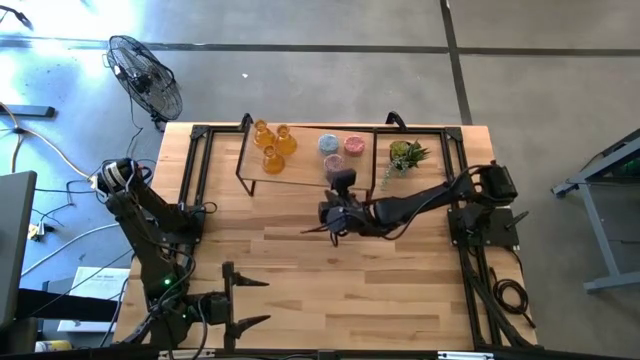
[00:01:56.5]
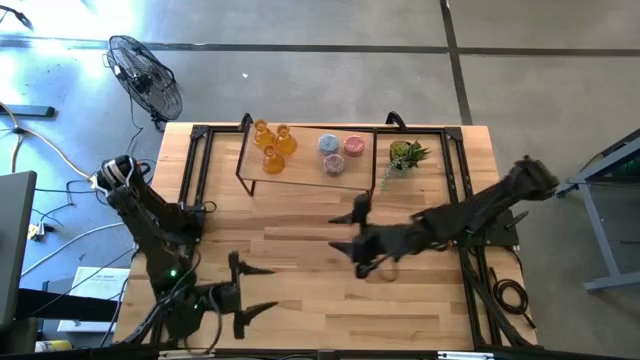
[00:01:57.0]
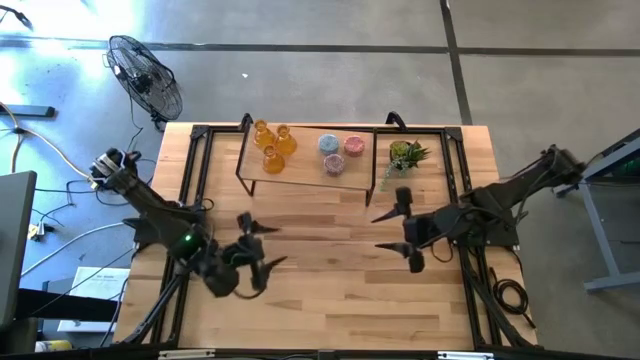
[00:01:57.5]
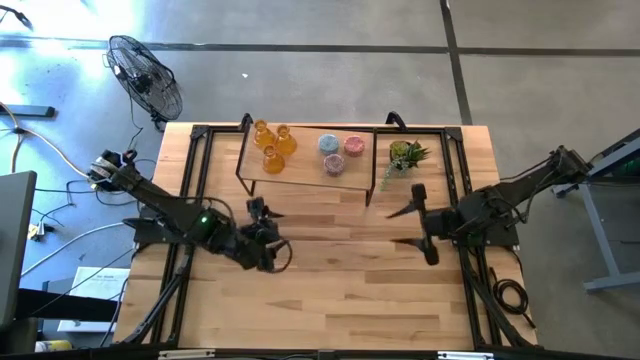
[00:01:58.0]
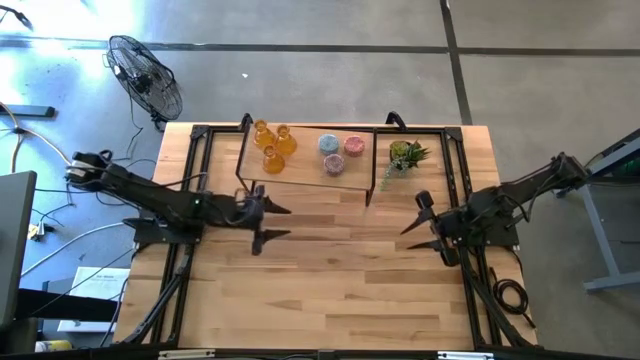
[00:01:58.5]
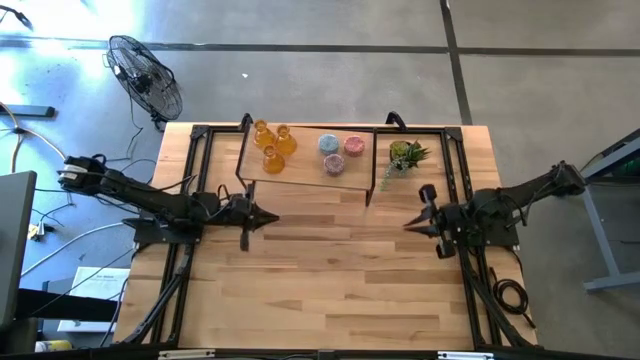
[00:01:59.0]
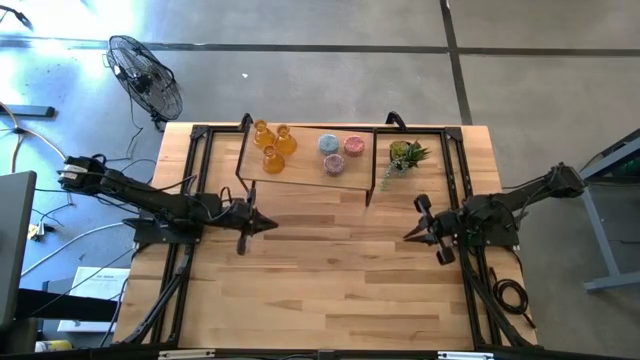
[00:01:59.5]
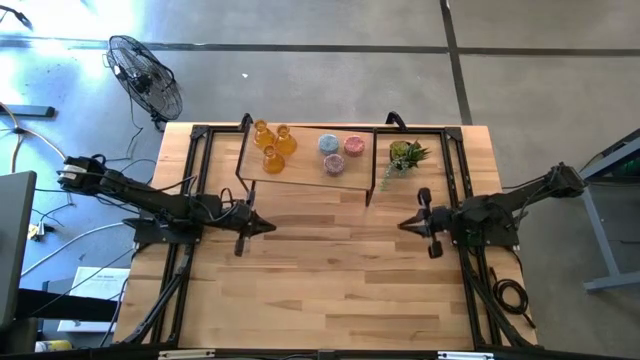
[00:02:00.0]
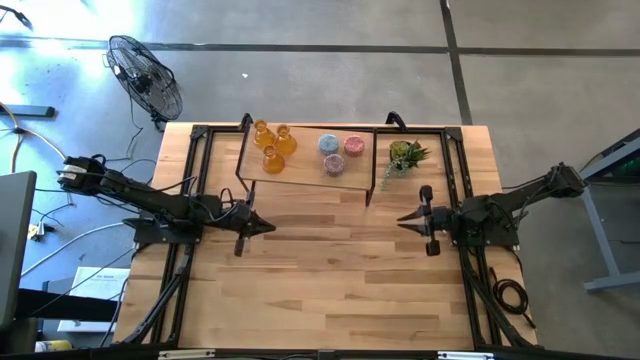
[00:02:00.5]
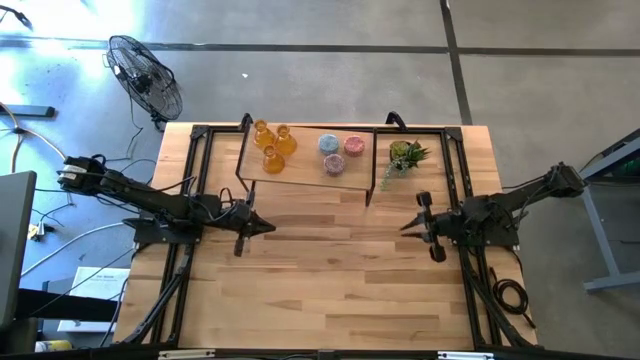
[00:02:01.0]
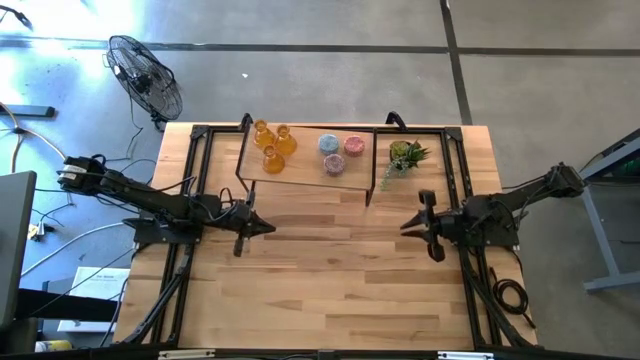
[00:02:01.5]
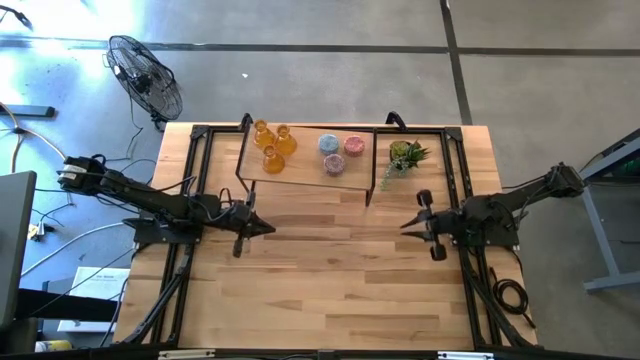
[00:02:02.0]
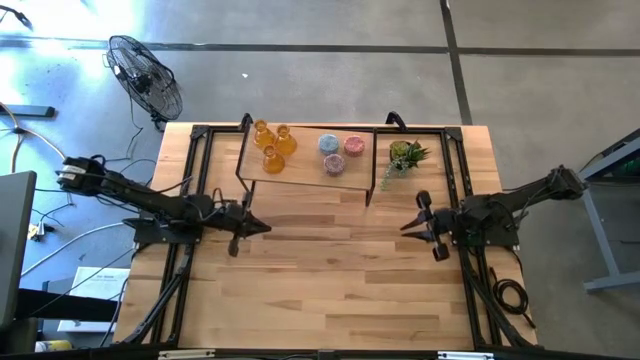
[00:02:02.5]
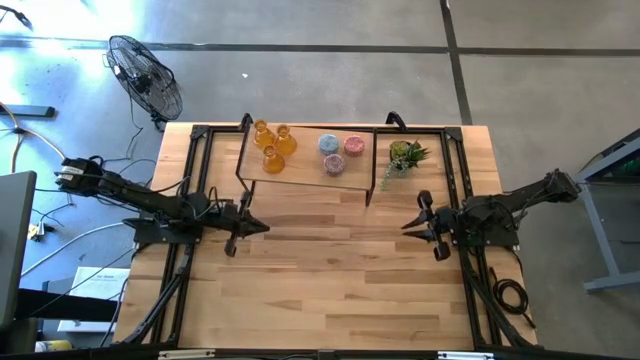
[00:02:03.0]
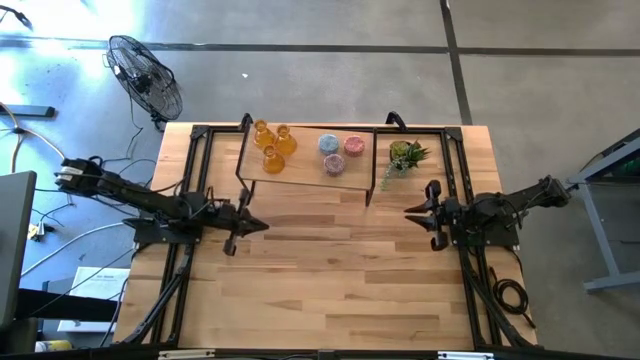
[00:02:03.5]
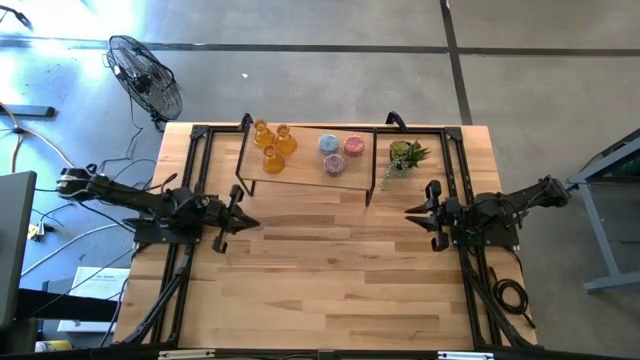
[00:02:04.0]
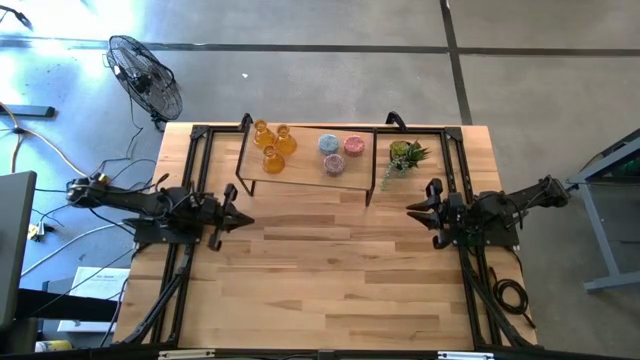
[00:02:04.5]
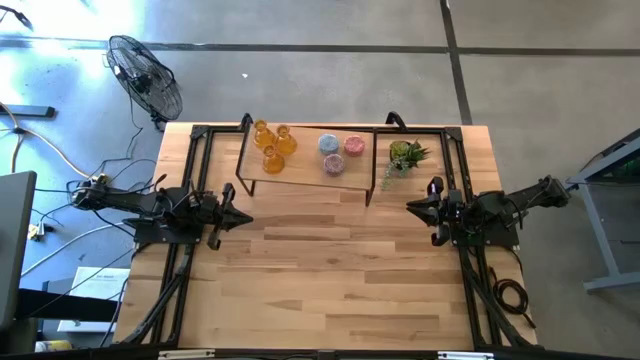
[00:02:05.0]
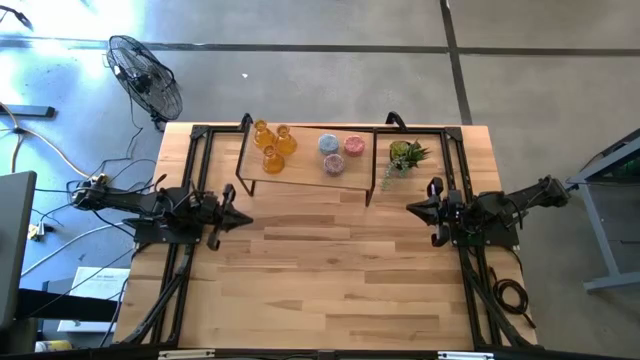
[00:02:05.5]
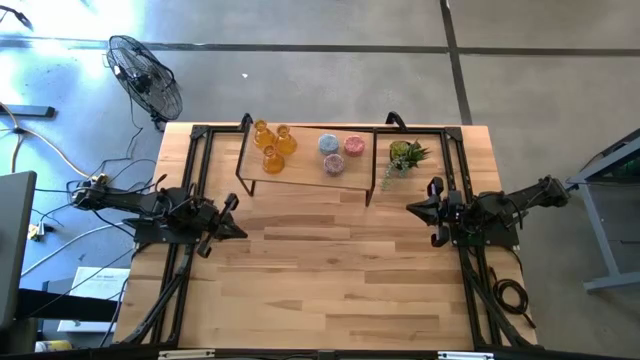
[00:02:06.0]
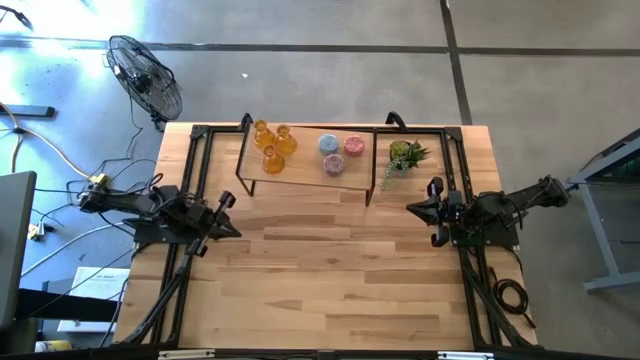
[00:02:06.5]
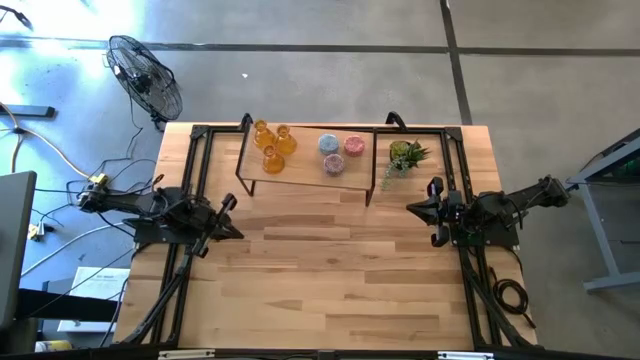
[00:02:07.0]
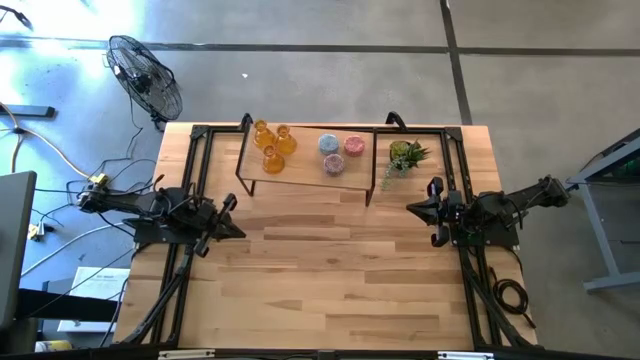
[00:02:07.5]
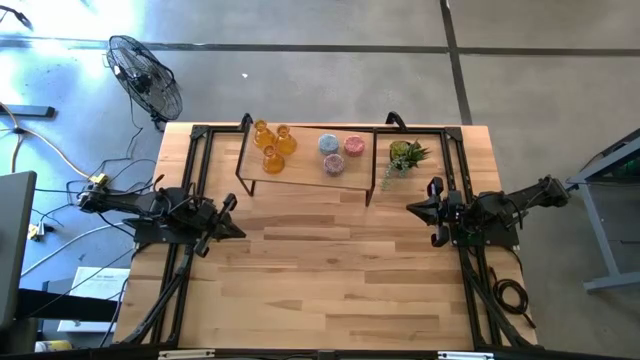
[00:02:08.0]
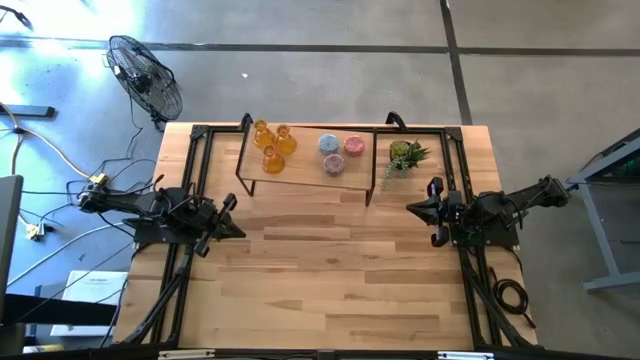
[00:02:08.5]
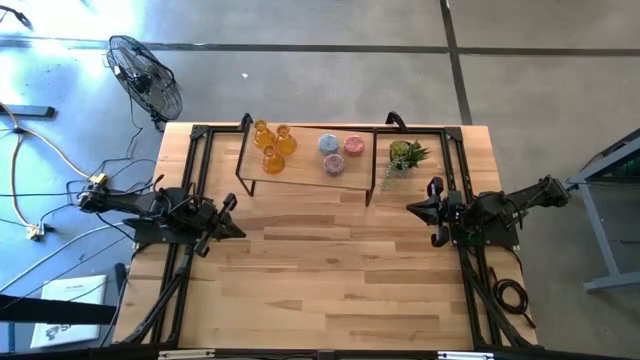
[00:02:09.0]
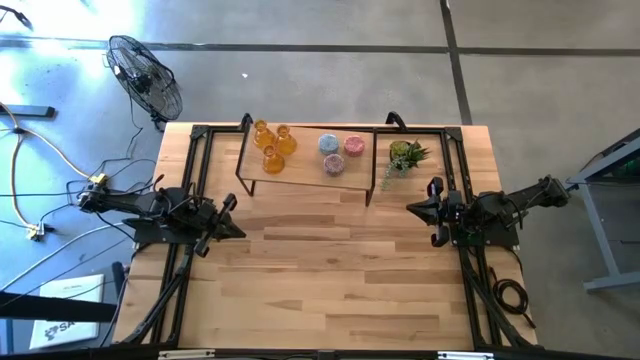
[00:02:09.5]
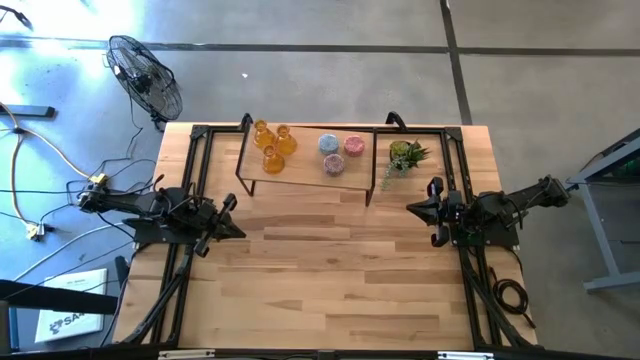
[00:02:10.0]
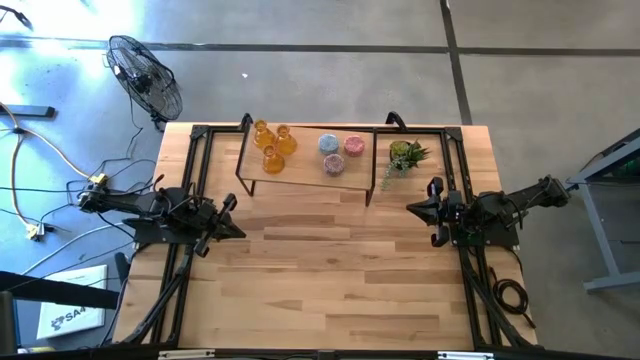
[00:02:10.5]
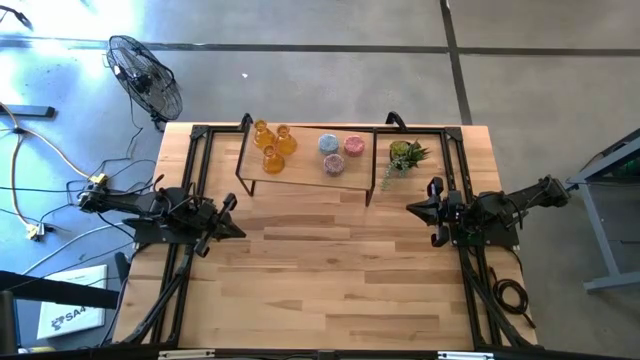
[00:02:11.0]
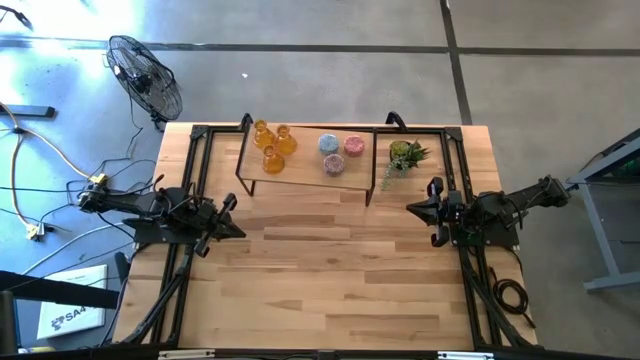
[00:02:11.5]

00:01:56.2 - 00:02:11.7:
Task: Pick & Place candle stick holders
Return to Home Position

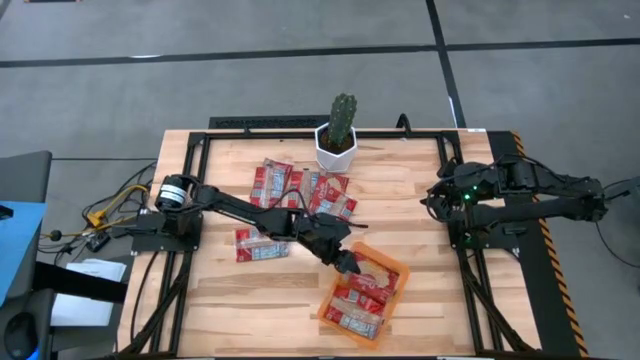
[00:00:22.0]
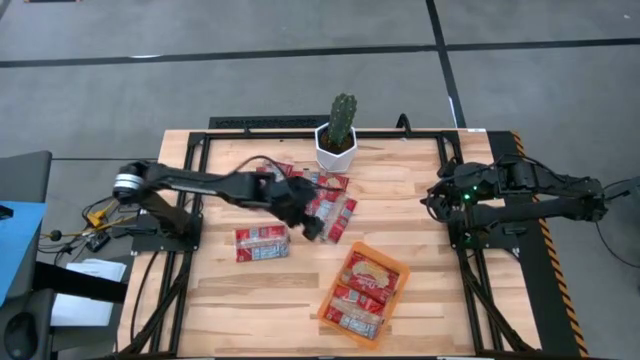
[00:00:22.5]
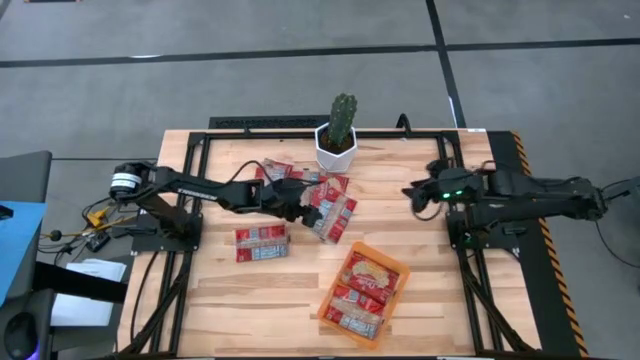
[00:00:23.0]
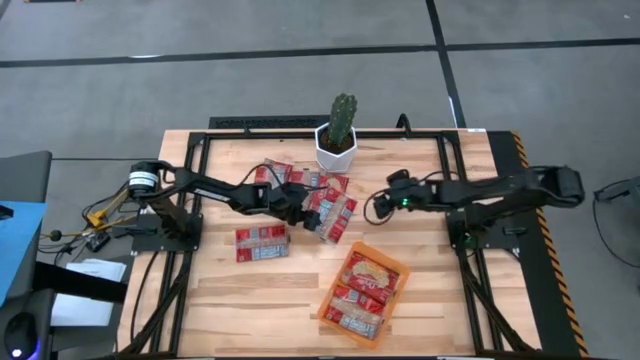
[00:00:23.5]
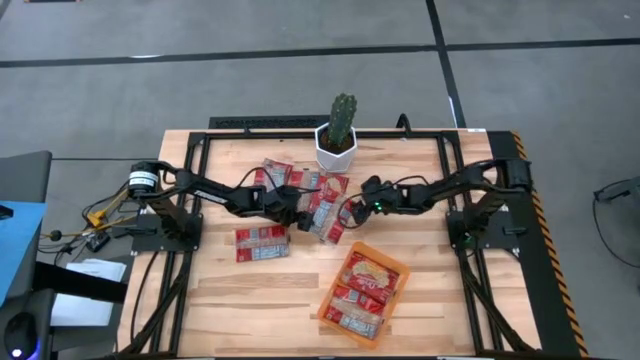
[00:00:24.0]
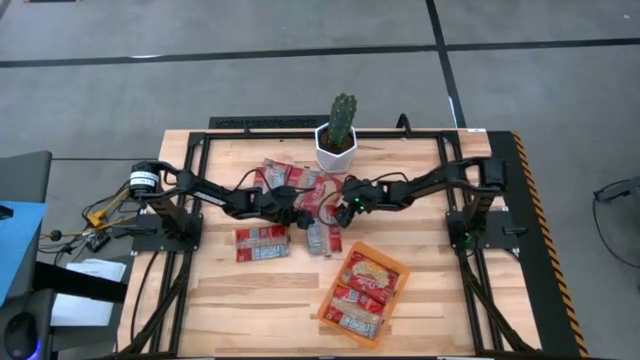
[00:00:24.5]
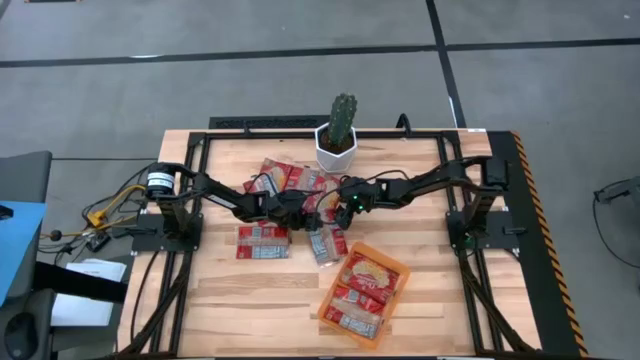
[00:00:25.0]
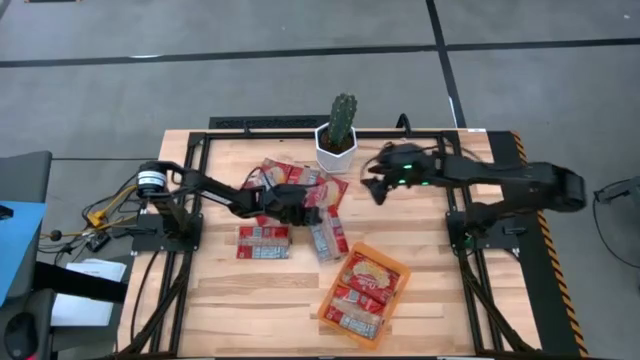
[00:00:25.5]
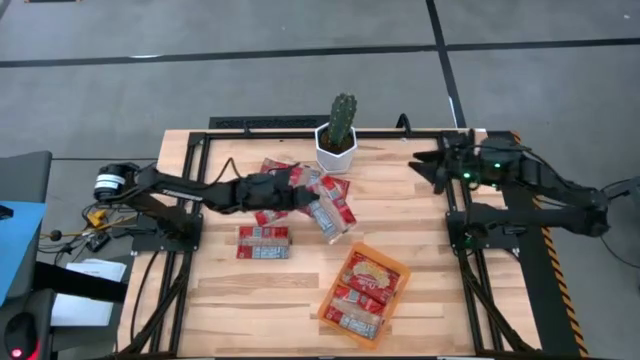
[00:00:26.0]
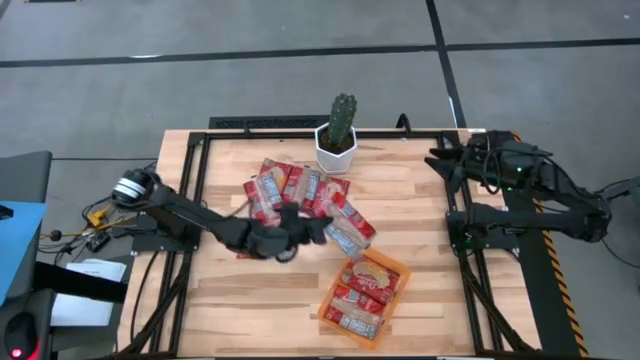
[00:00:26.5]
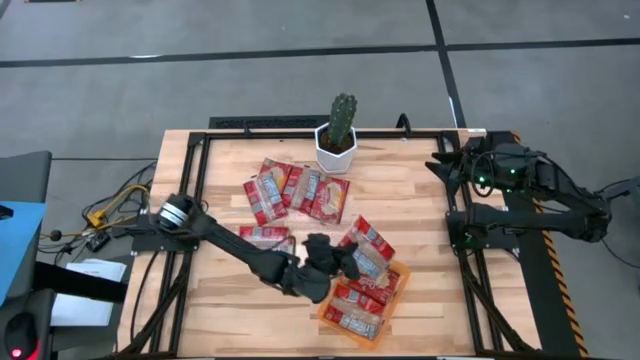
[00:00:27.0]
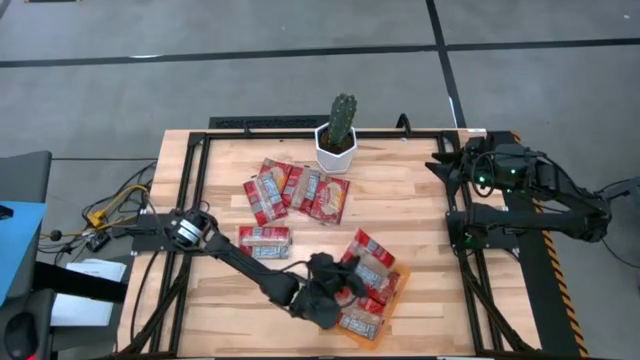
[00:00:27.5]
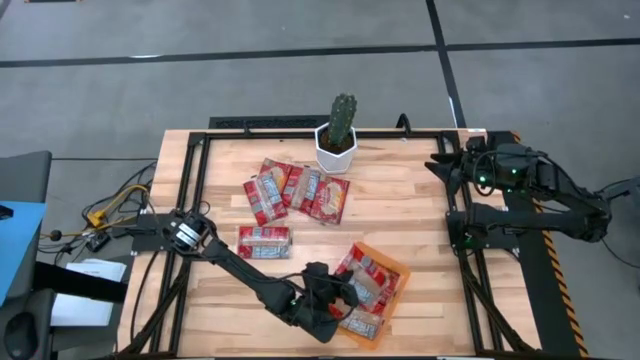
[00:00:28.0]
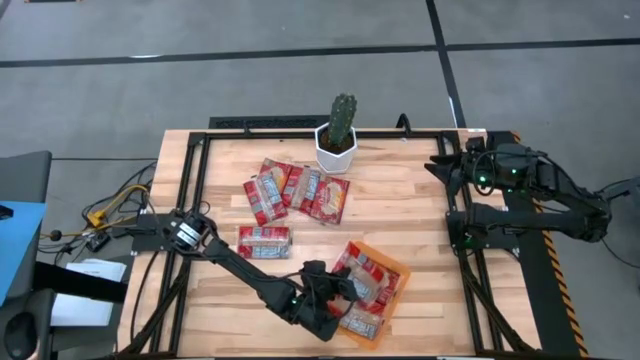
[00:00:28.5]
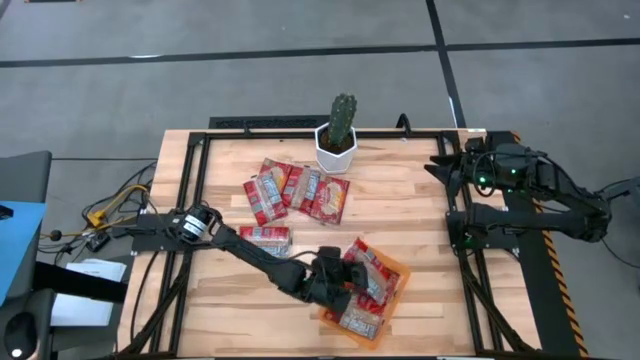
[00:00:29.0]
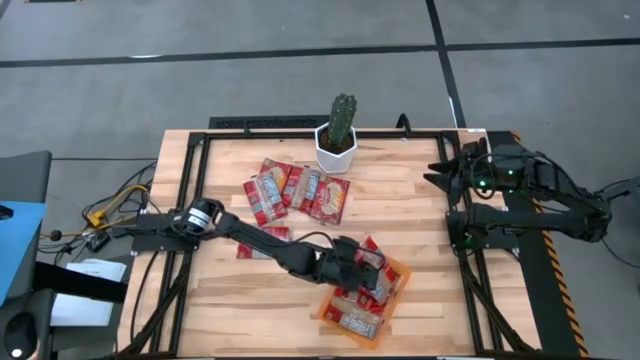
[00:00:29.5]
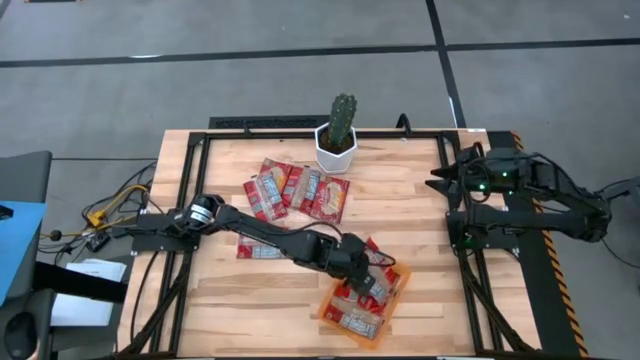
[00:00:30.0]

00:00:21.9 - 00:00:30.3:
Task: Sort popcorn bags into baskets
Put the red popcorn bag into the orange container
